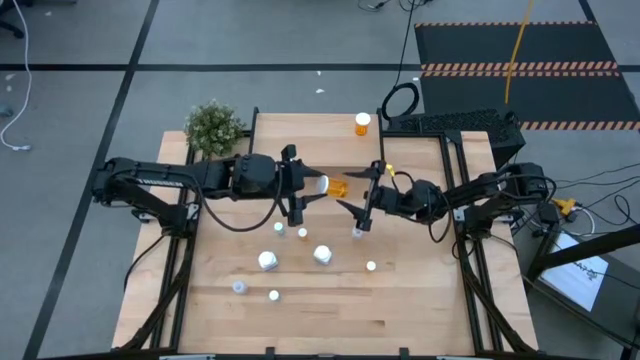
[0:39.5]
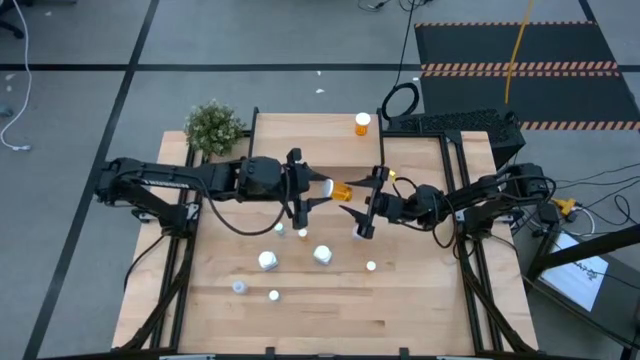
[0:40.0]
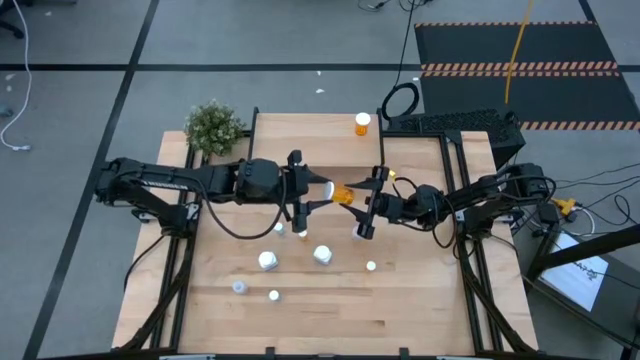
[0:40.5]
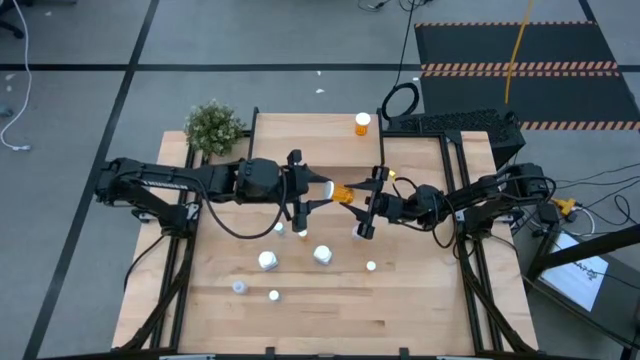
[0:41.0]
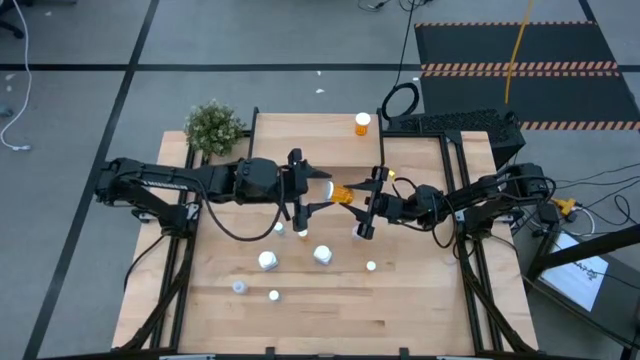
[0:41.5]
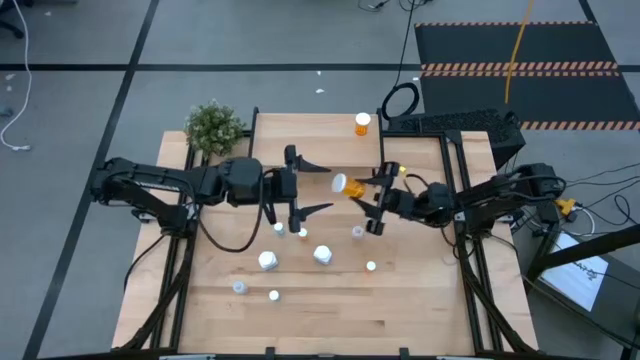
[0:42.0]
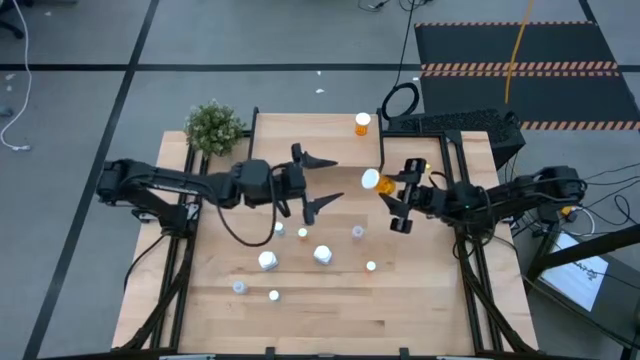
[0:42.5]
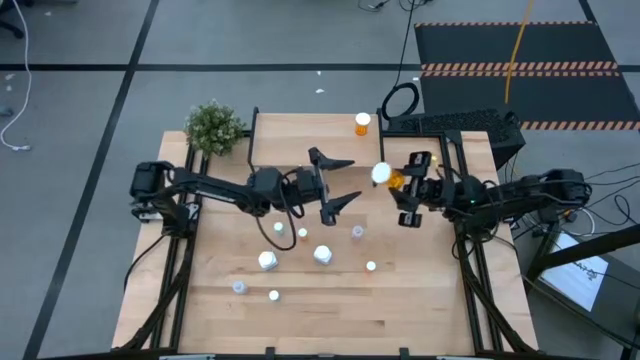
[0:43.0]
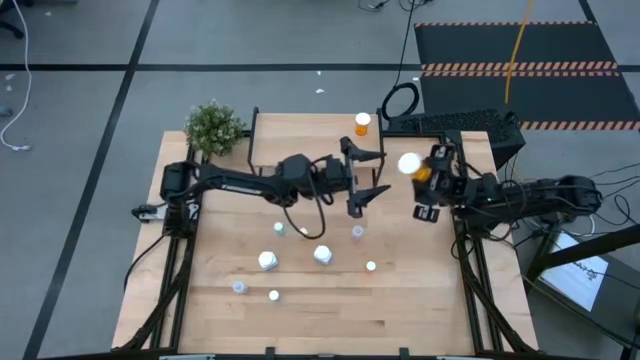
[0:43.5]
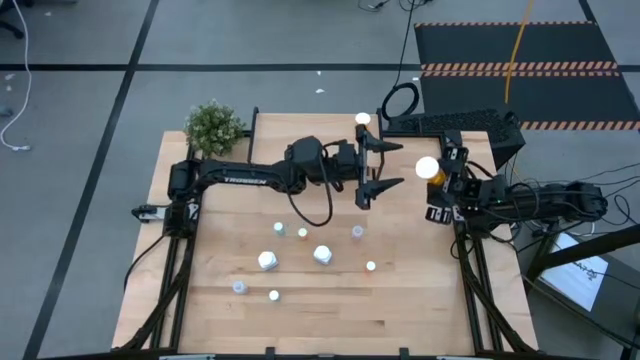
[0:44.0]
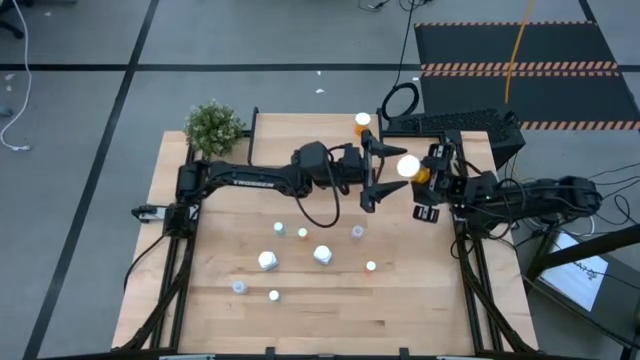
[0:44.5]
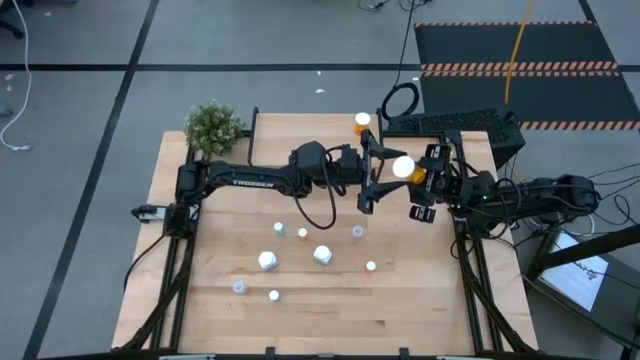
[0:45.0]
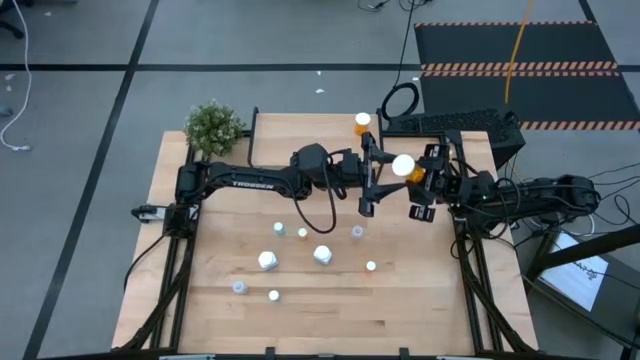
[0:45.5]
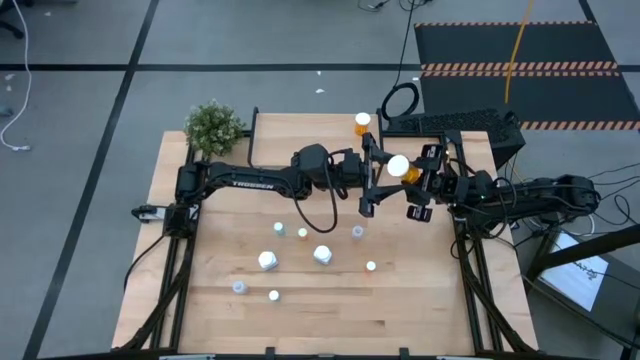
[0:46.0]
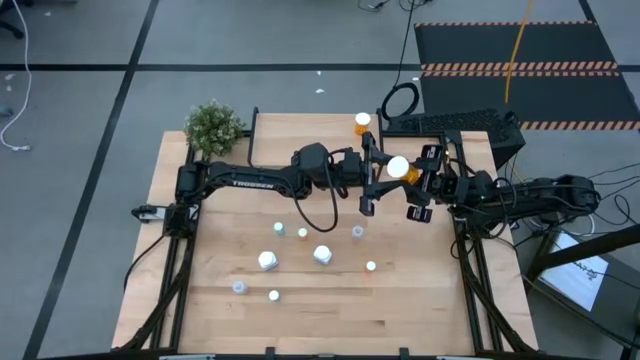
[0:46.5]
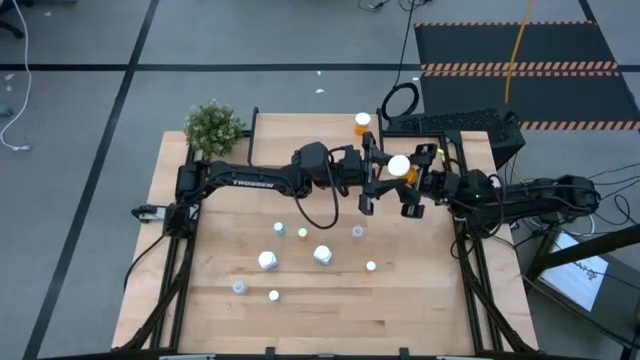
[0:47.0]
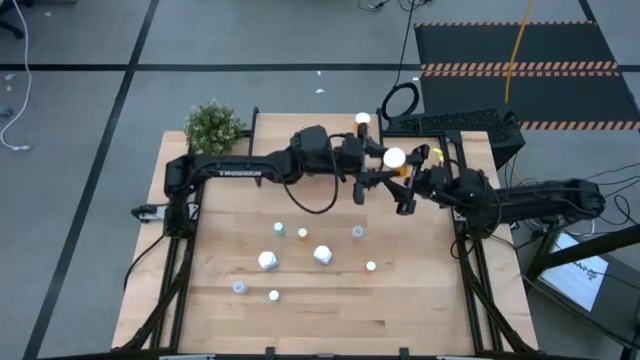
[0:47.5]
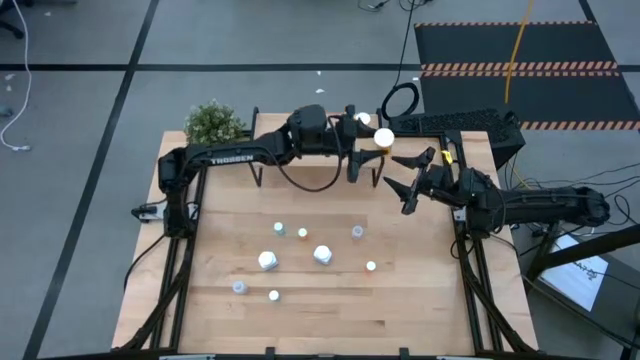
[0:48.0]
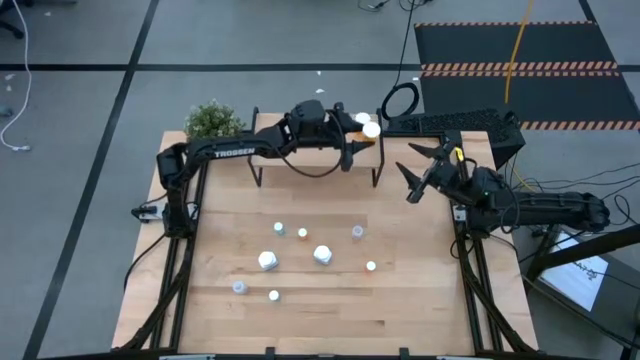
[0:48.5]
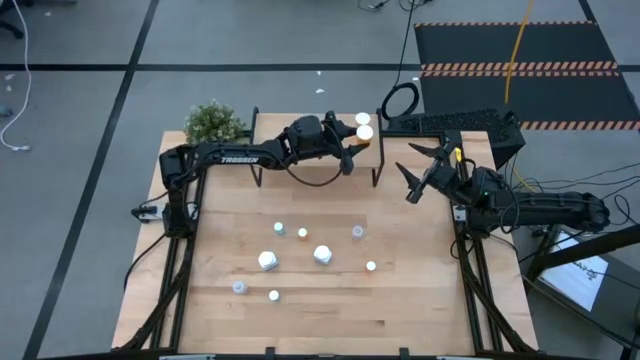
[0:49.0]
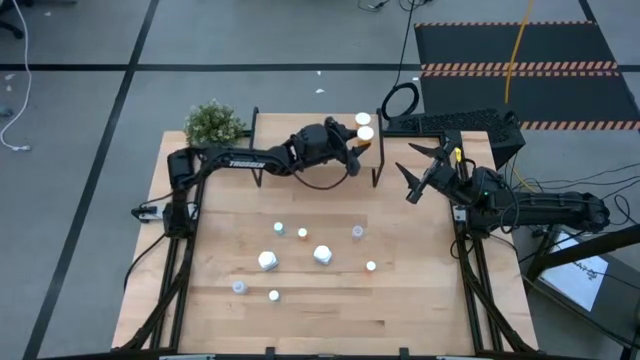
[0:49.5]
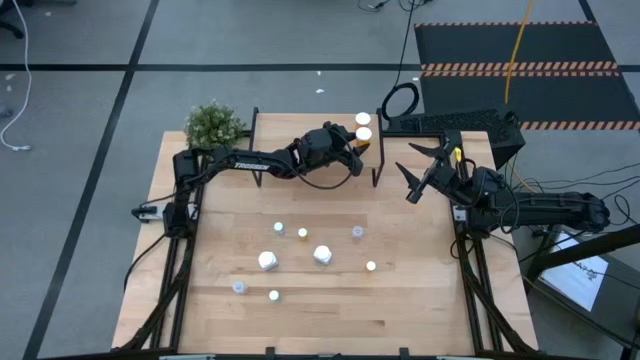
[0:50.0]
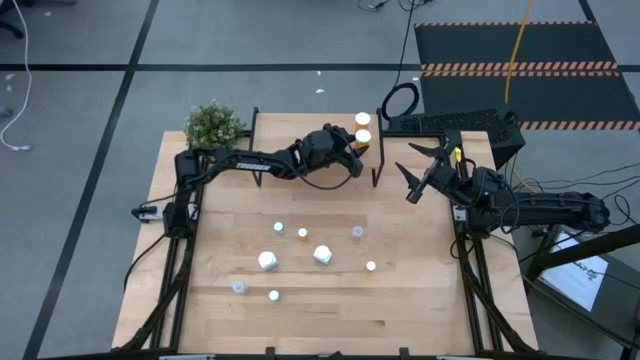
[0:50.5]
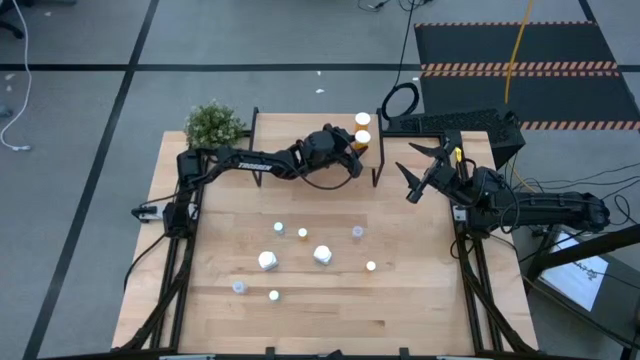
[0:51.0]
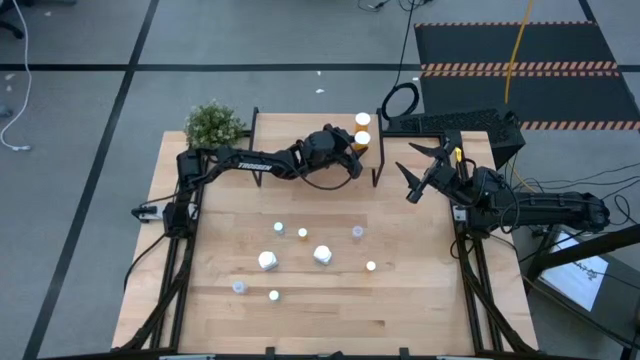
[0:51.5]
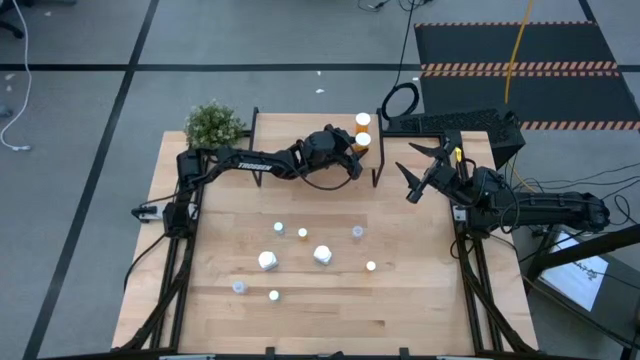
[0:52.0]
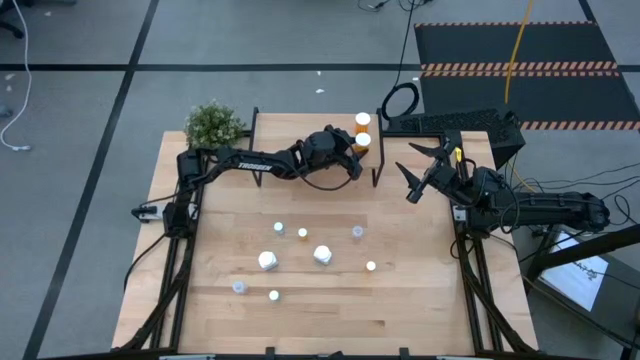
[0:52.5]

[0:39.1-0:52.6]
Task: Pick and place medicine bottles onto shelf by color
Put the big orange pill bottle on the shelf aligned with the big orange pill bottle

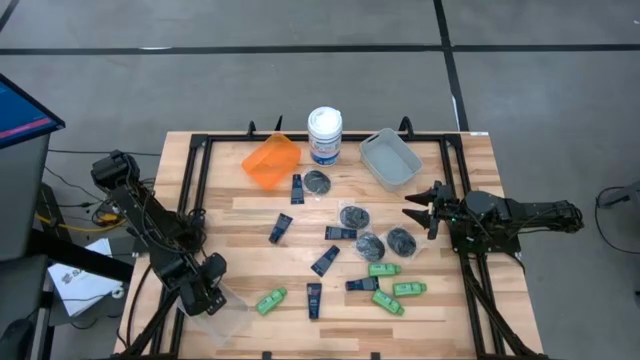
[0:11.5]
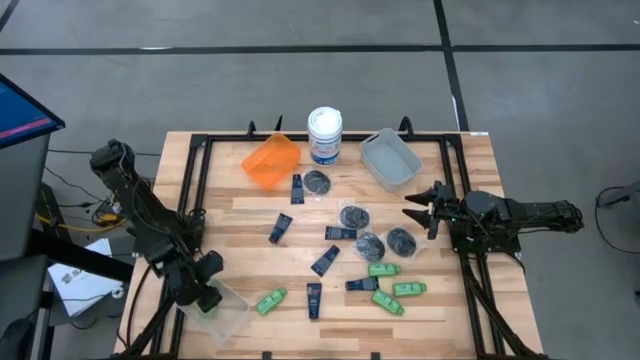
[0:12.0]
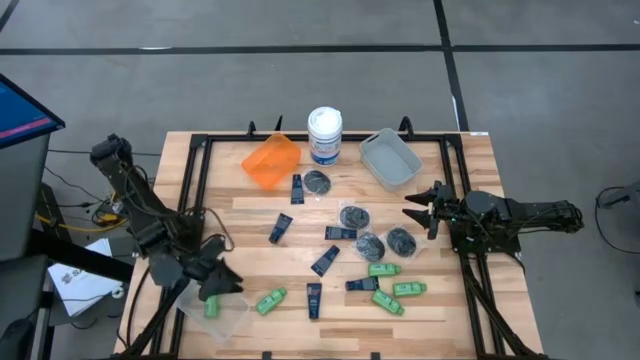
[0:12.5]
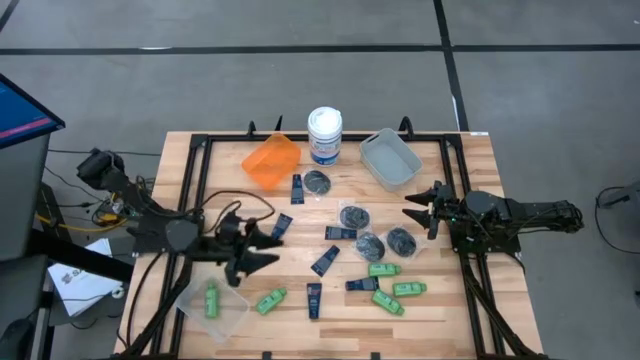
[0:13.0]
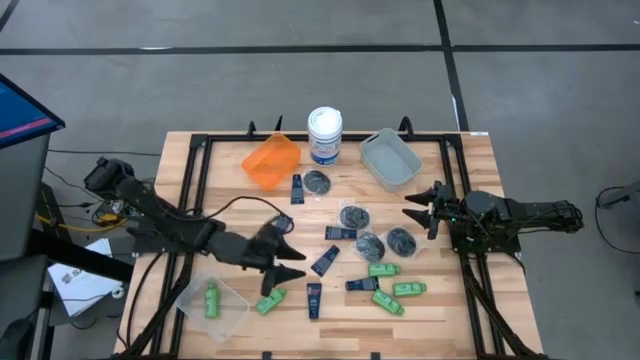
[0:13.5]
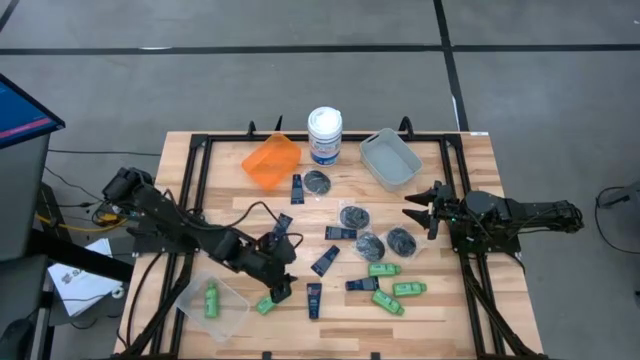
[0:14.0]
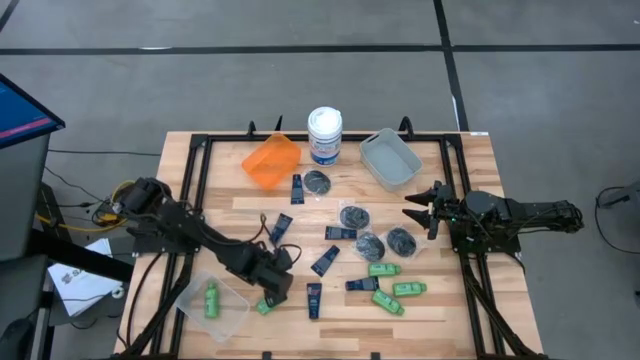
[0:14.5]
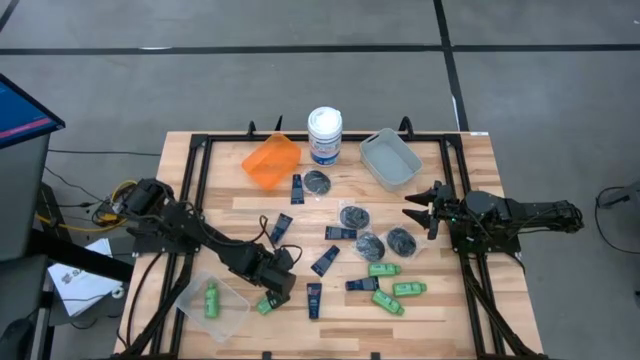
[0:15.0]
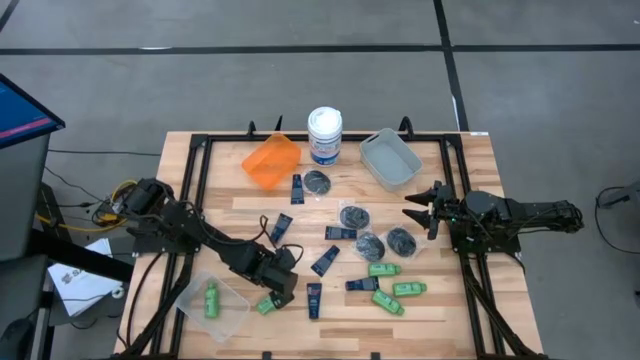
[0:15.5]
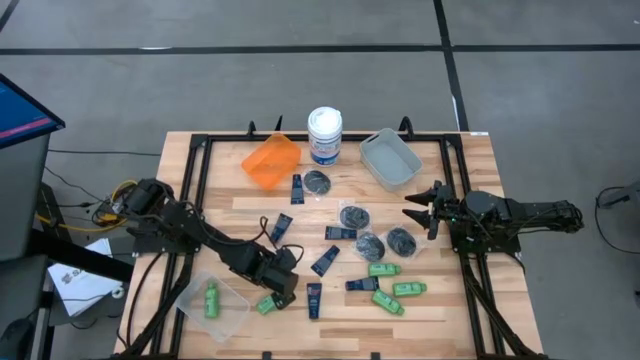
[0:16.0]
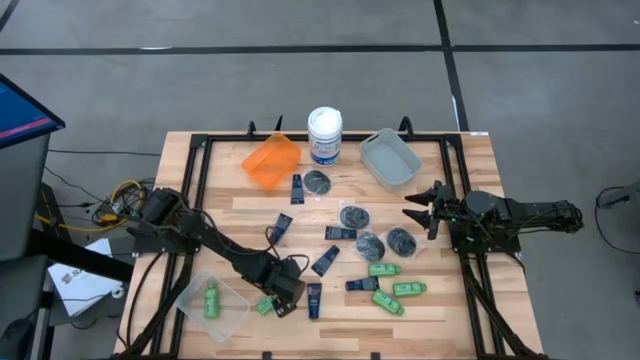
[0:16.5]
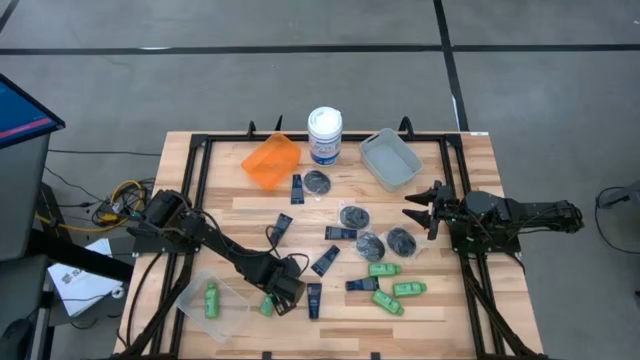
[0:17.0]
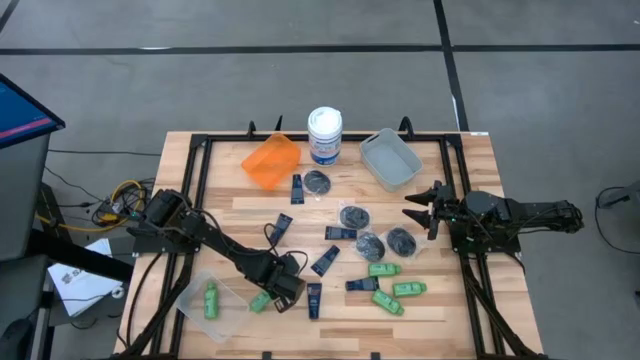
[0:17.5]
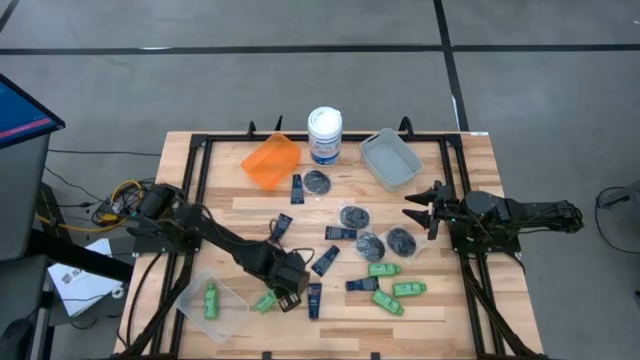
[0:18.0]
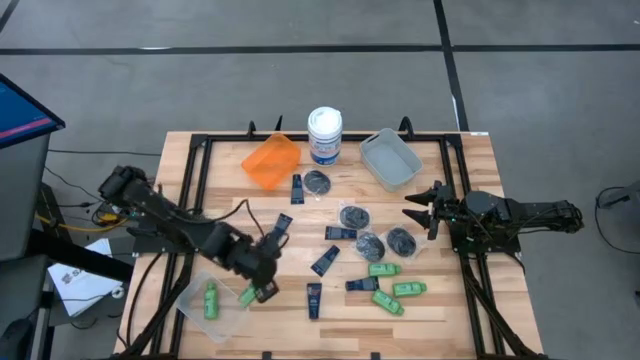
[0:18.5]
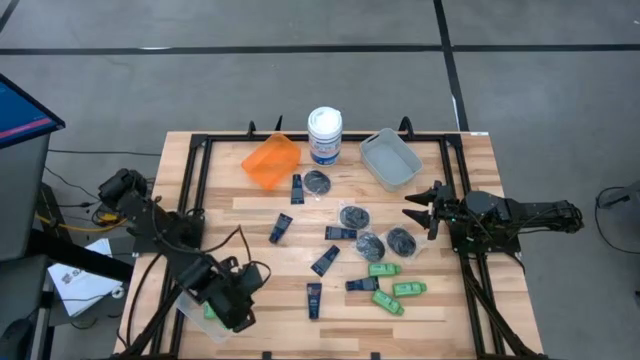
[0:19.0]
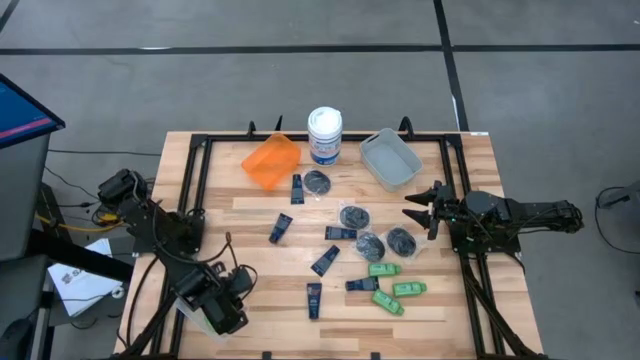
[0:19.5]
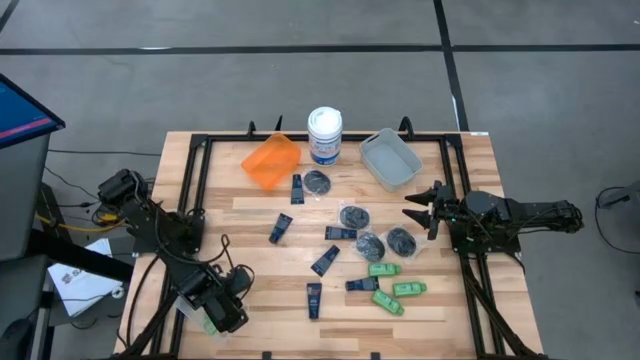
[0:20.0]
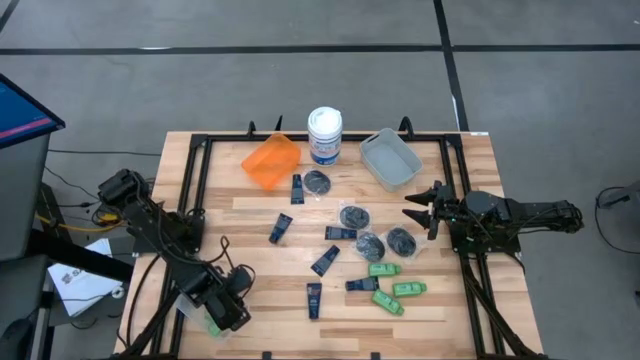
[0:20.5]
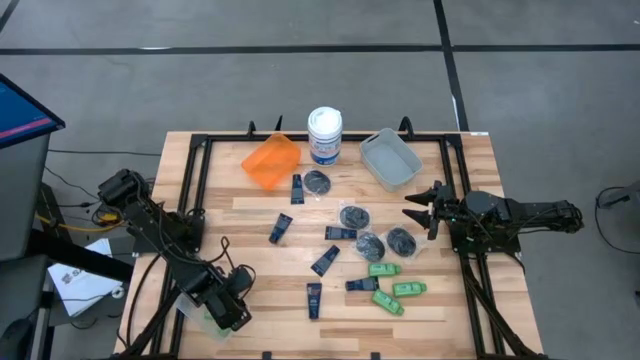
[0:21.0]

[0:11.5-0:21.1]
Task: Pick & Place Travel size toiletries
Put the shampoo into the white bin
